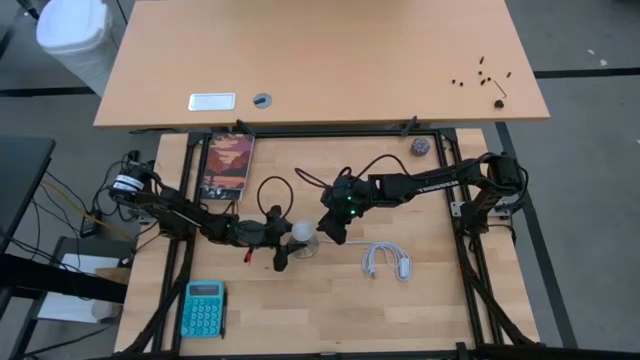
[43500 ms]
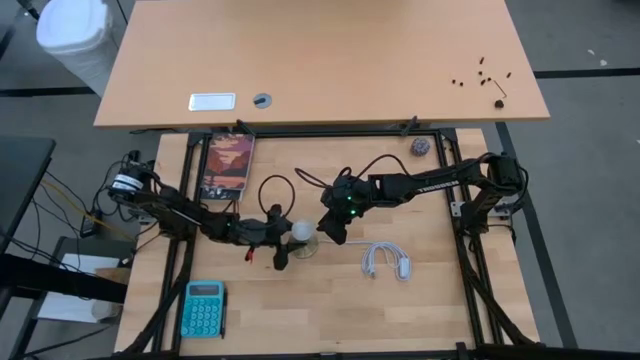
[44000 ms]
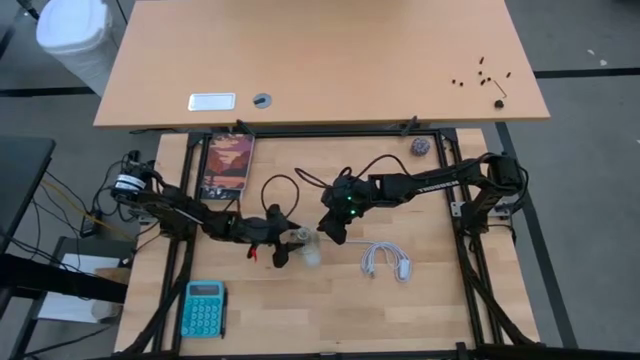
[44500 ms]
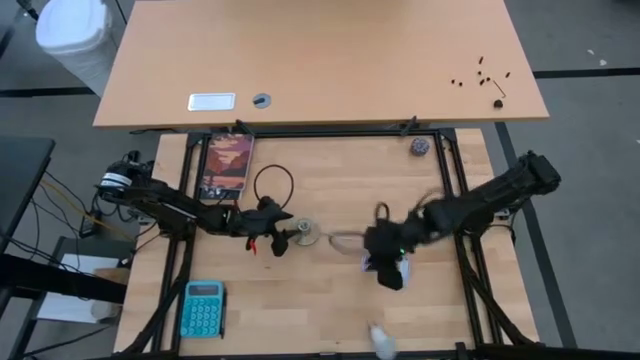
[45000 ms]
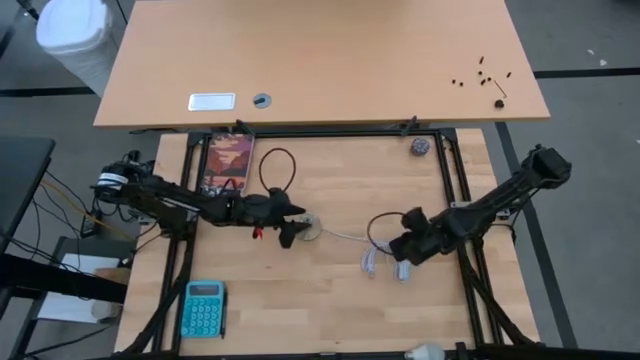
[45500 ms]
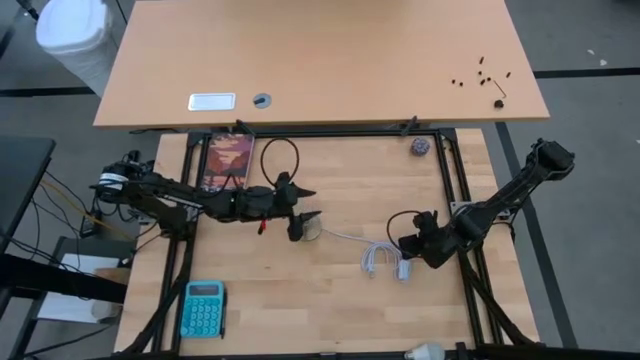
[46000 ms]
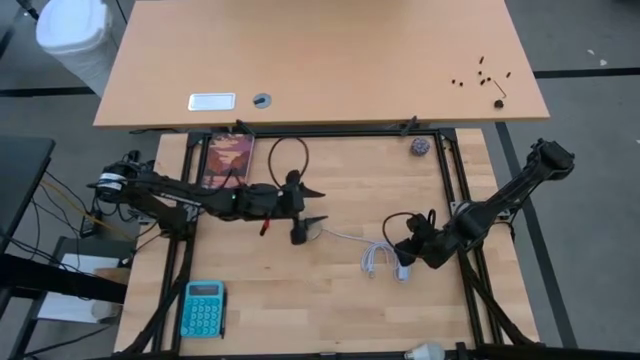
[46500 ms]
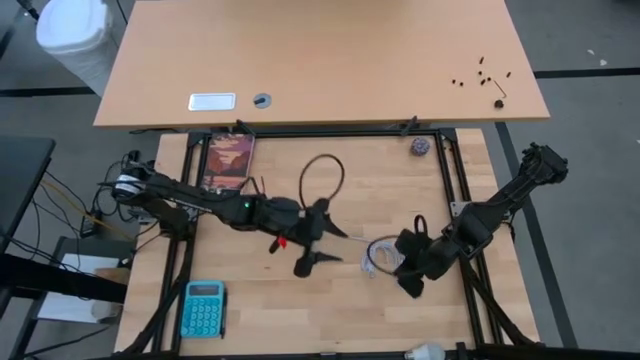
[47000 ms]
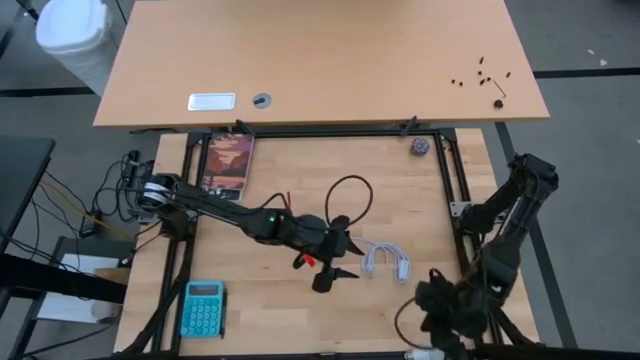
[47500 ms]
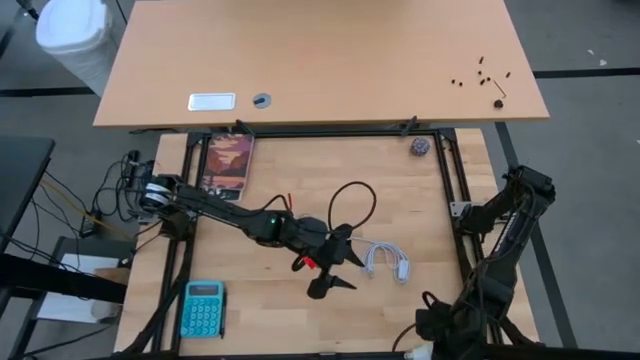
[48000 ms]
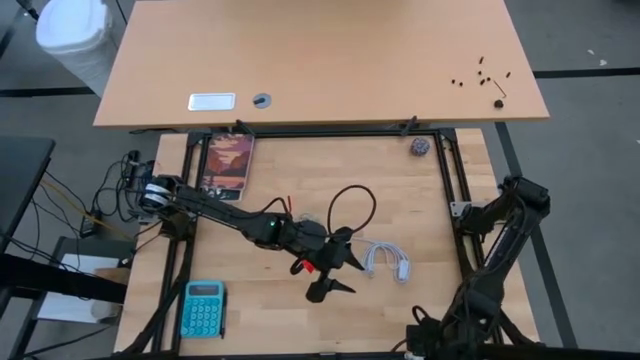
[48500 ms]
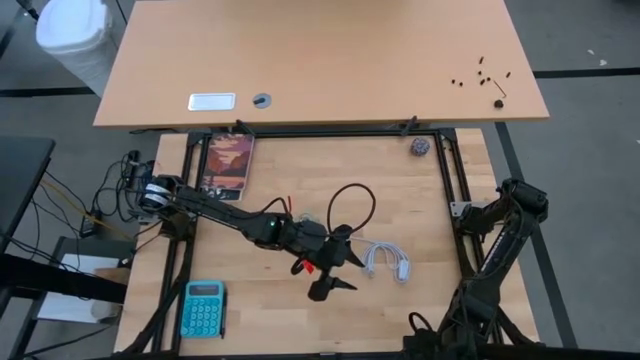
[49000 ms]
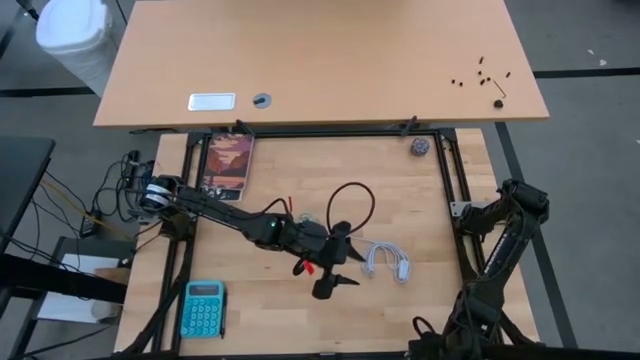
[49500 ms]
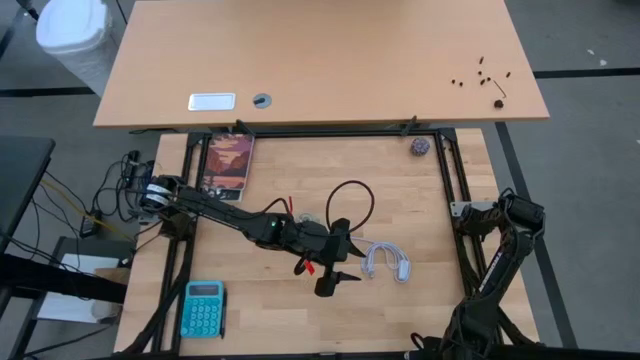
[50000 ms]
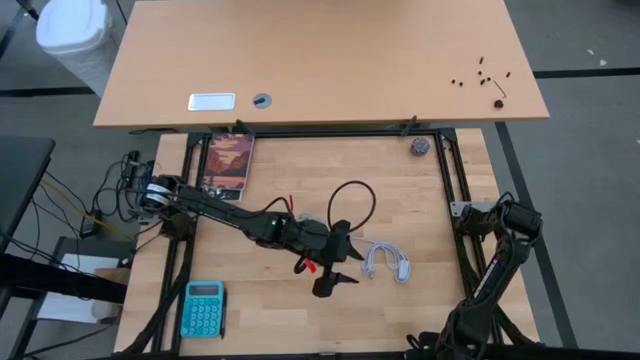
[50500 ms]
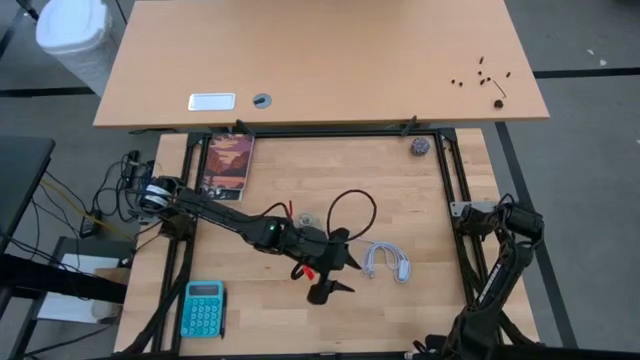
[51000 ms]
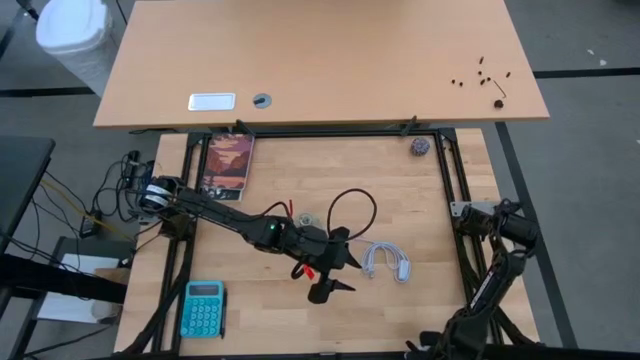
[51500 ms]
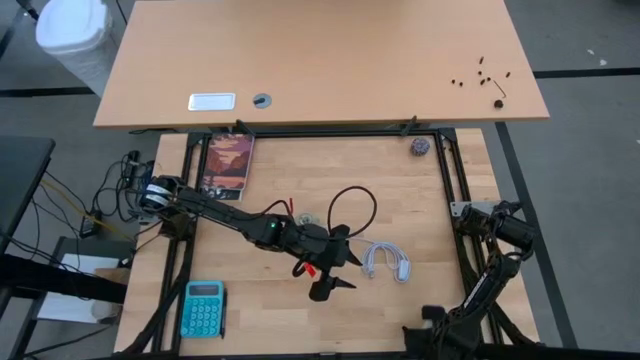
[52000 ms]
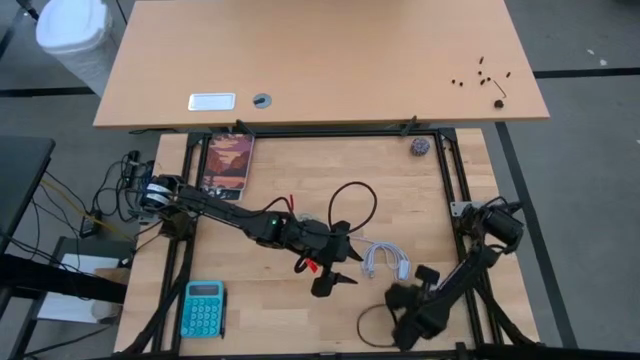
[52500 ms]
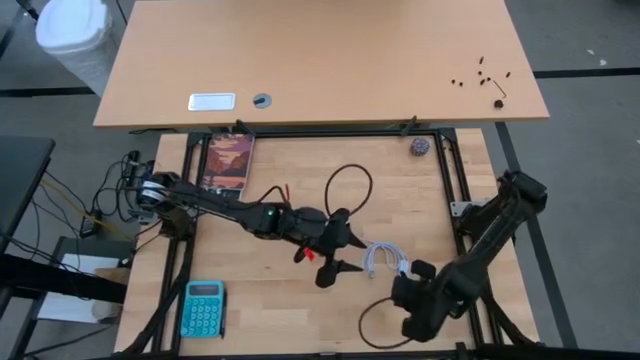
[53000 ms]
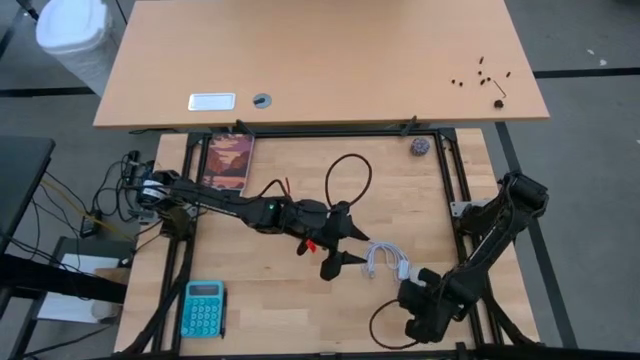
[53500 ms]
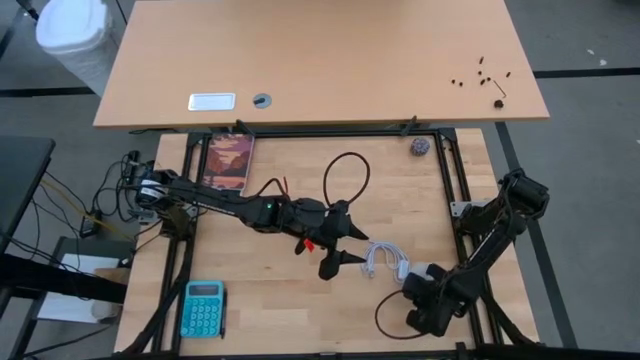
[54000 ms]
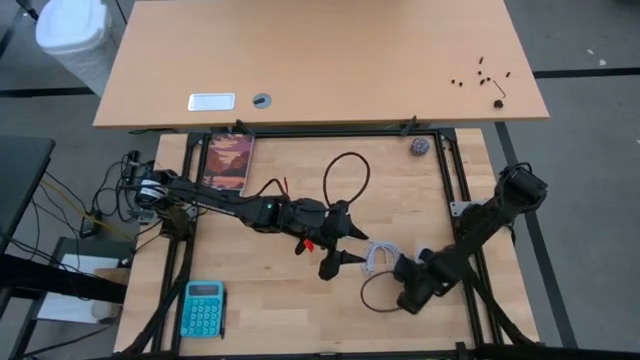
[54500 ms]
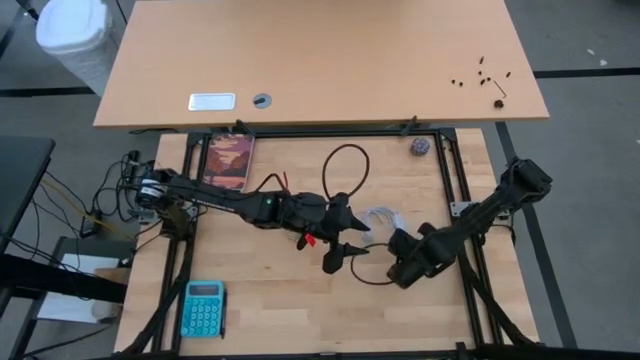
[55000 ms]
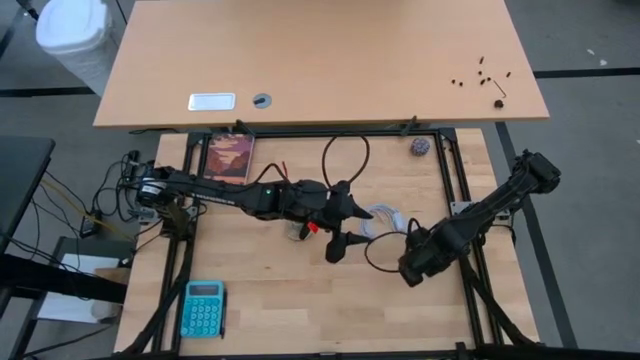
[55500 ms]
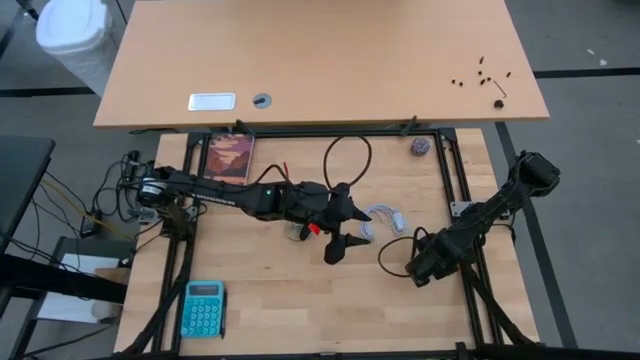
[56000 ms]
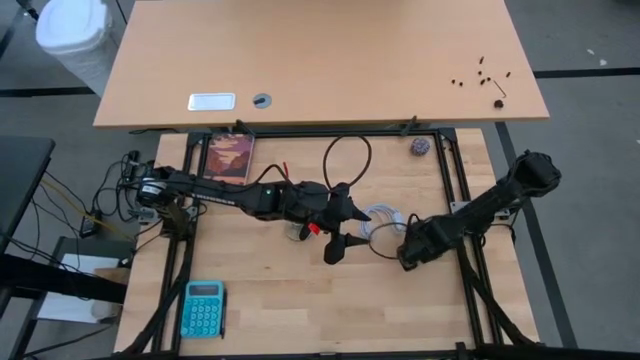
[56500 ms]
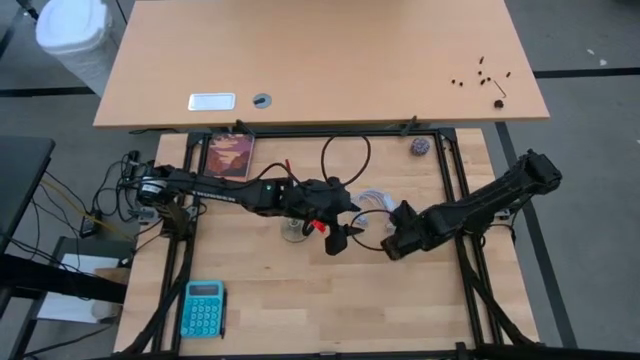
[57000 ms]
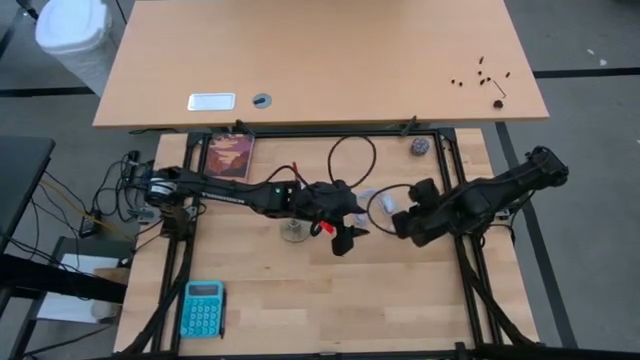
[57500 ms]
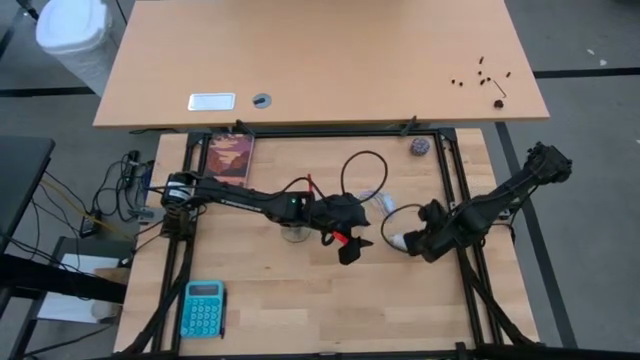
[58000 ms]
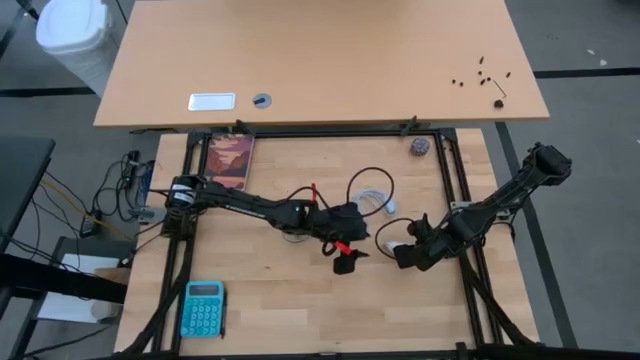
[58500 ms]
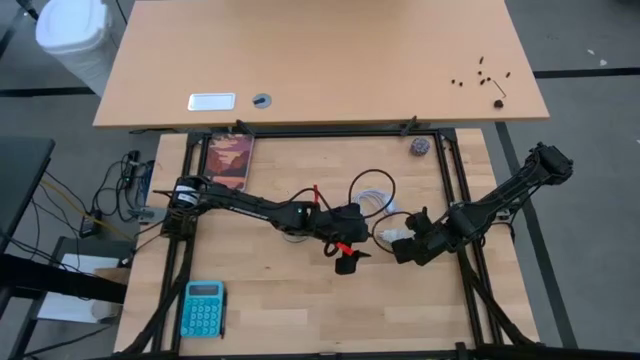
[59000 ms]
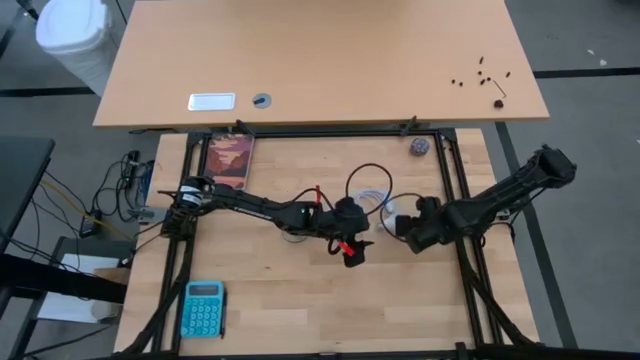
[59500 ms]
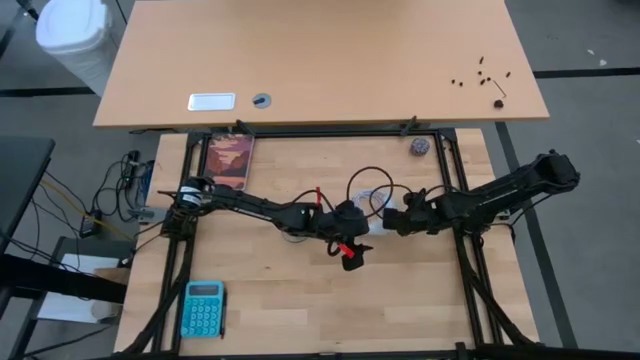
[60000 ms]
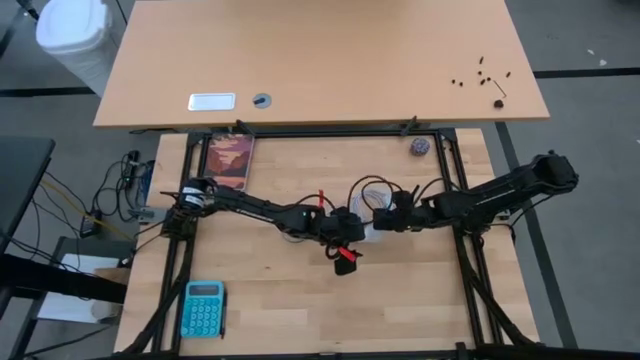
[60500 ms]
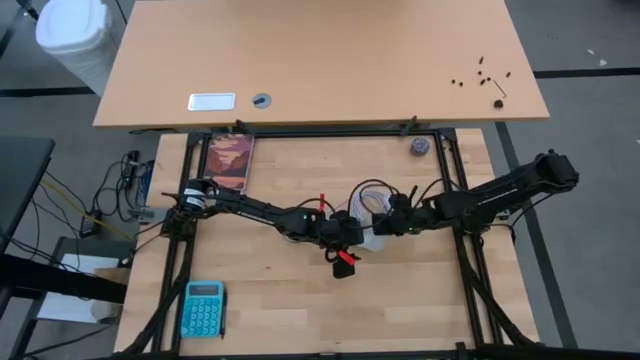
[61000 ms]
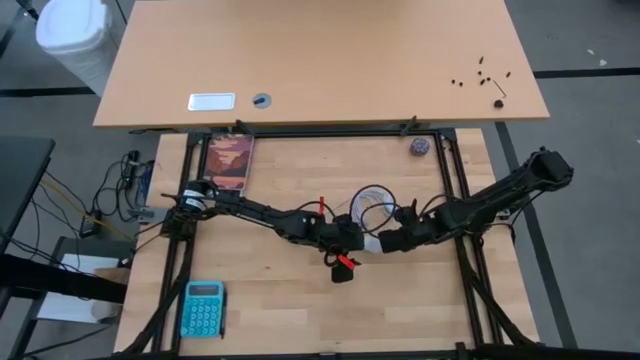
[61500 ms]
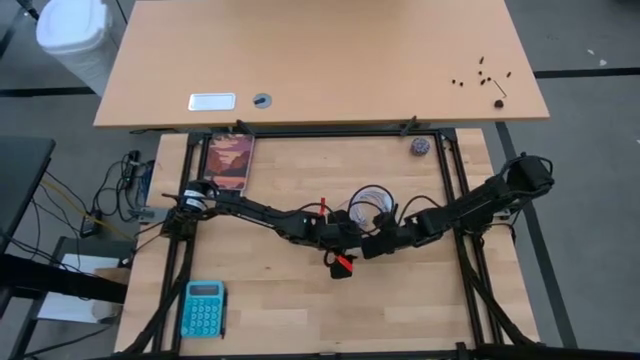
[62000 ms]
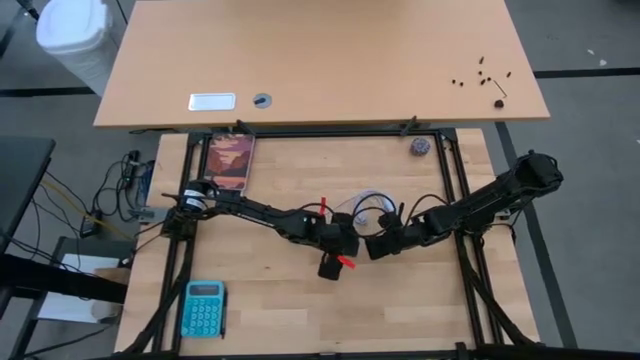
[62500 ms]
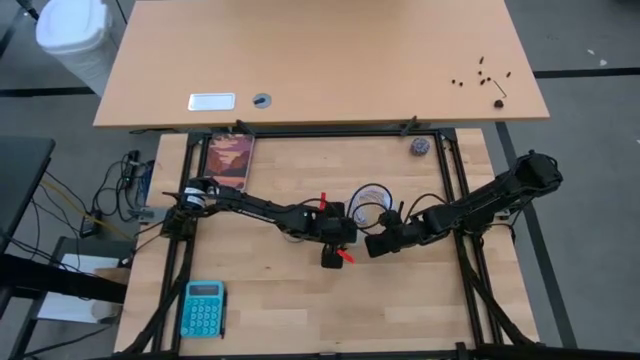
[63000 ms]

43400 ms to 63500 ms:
Task: Screw lightbulb
Insert the lightbulb into the desk lamp

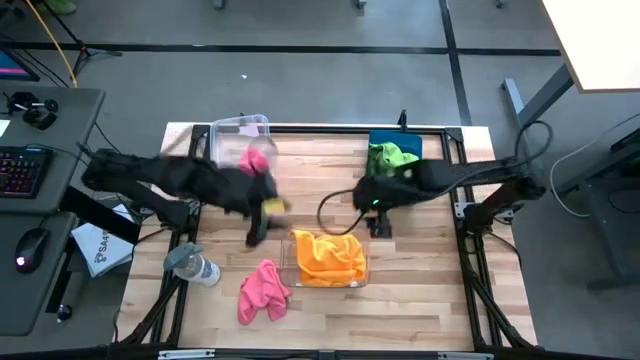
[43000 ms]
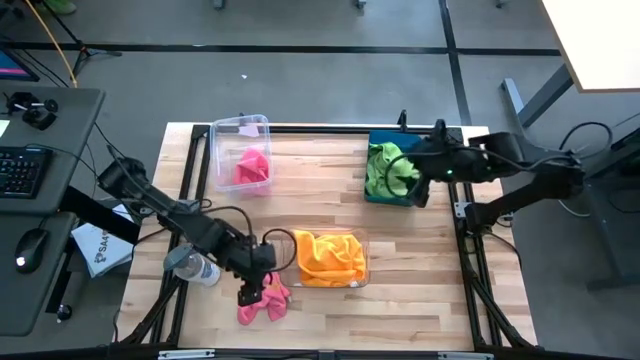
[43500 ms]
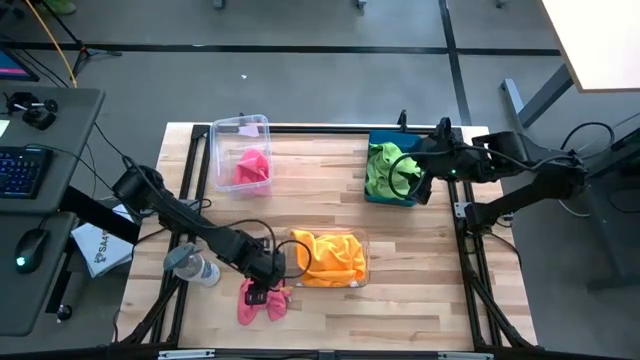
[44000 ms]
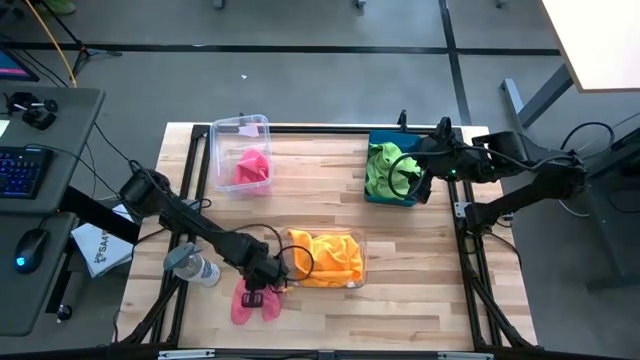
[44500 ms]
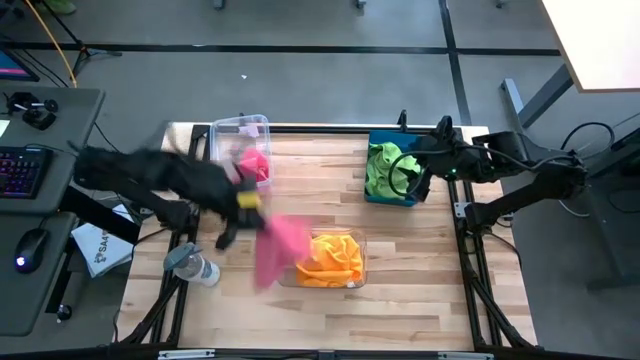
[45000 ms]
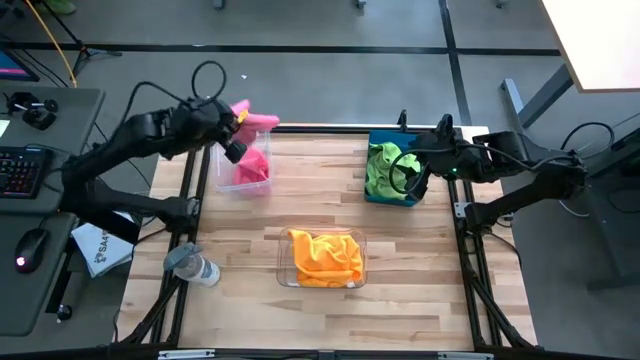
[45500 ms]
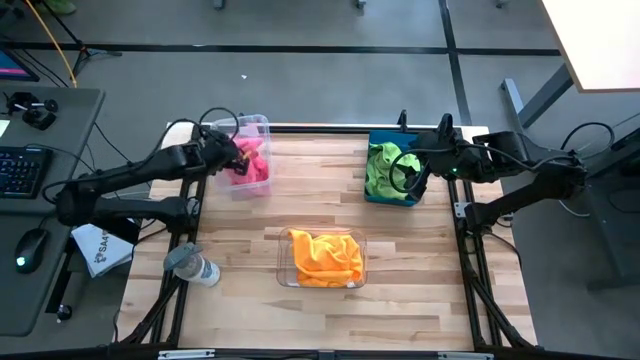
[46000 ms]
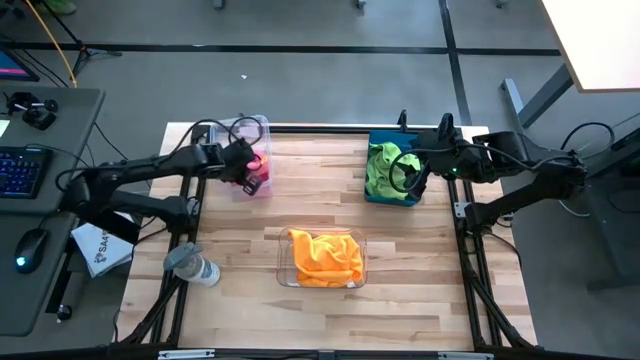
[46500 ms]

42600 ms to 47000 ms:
Task: Sort microfiber towel by color & place in baskets
Put the pink microfiber towel into the top transparent bin
